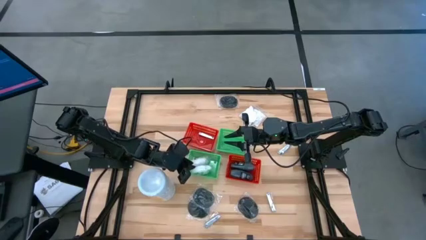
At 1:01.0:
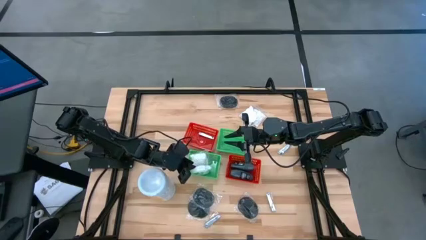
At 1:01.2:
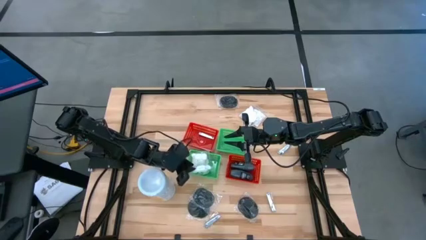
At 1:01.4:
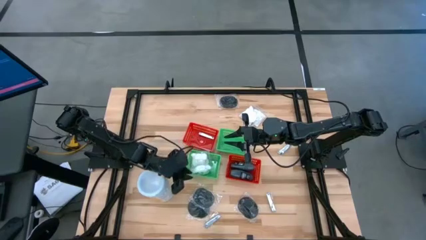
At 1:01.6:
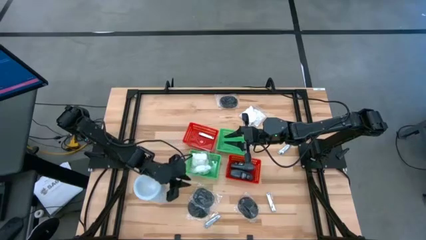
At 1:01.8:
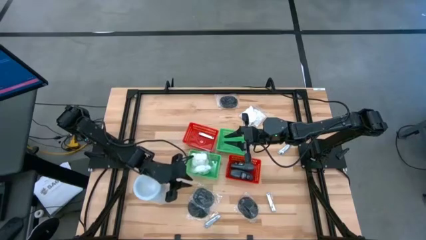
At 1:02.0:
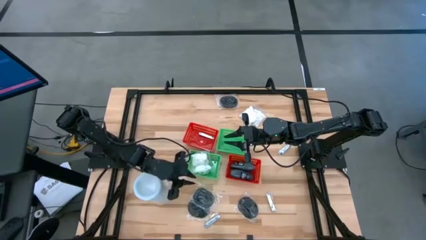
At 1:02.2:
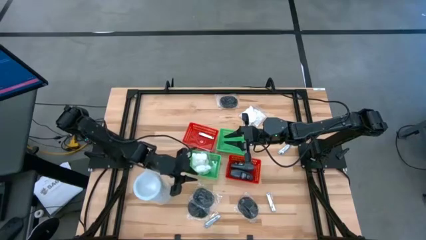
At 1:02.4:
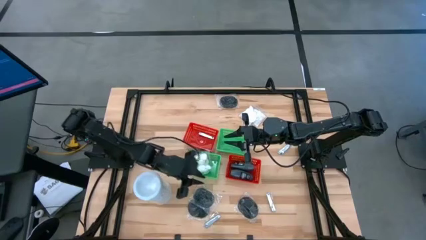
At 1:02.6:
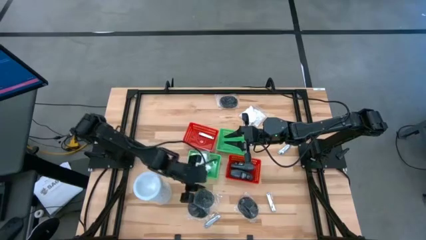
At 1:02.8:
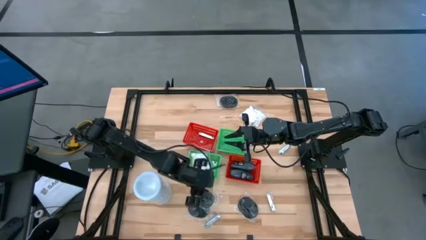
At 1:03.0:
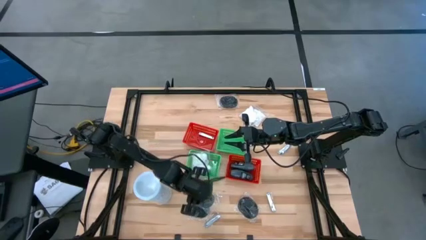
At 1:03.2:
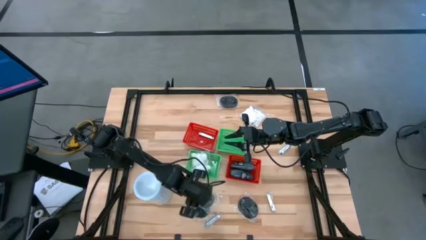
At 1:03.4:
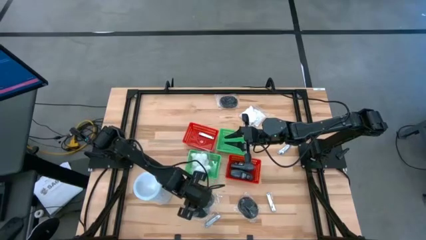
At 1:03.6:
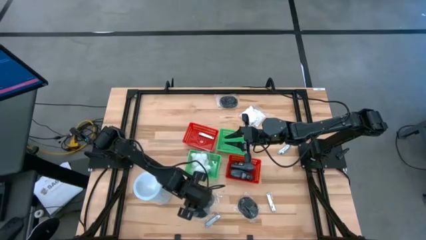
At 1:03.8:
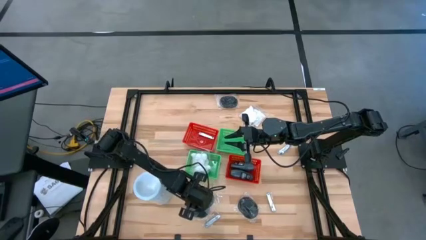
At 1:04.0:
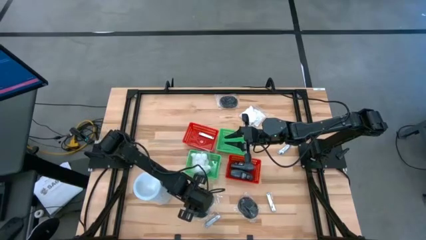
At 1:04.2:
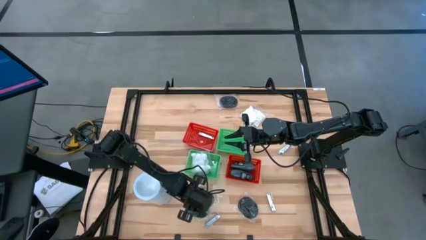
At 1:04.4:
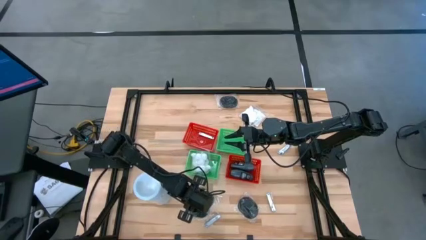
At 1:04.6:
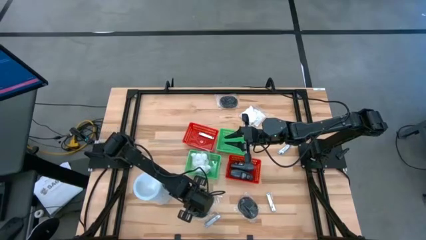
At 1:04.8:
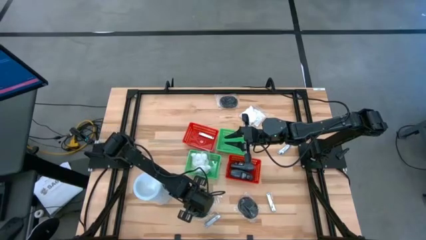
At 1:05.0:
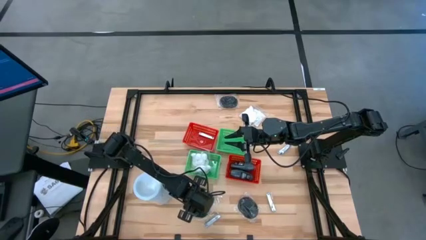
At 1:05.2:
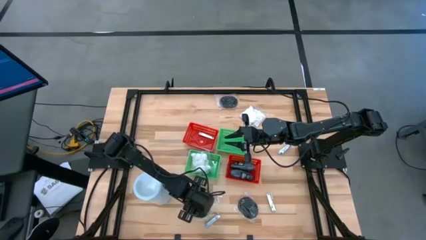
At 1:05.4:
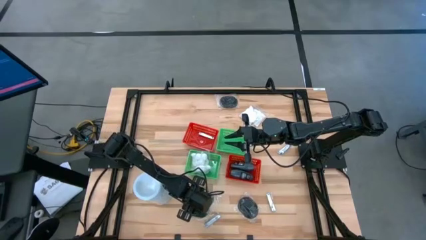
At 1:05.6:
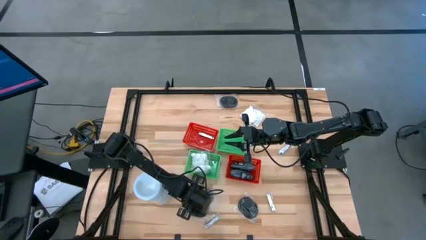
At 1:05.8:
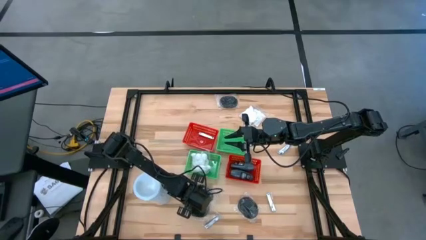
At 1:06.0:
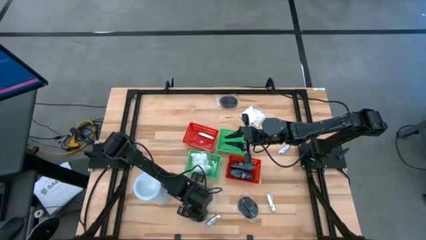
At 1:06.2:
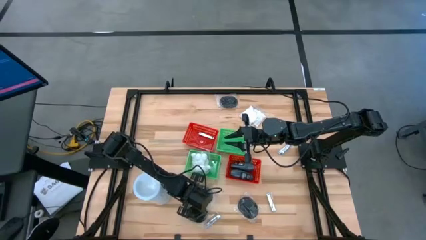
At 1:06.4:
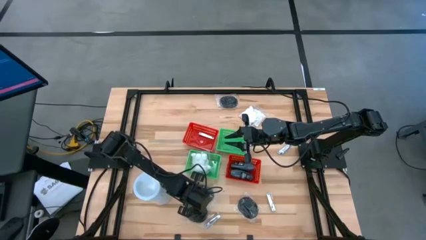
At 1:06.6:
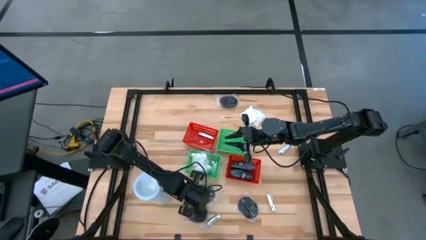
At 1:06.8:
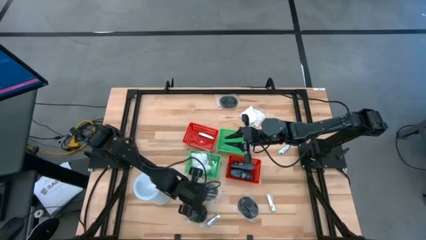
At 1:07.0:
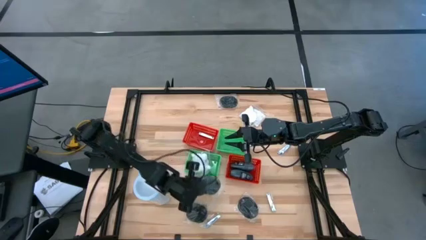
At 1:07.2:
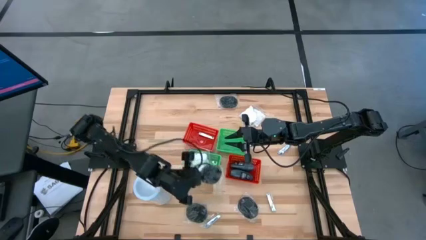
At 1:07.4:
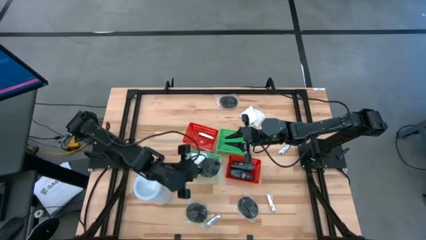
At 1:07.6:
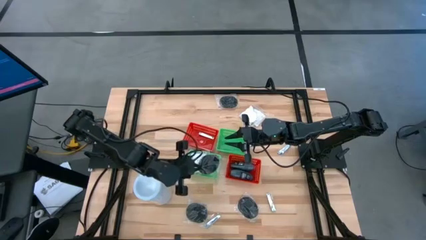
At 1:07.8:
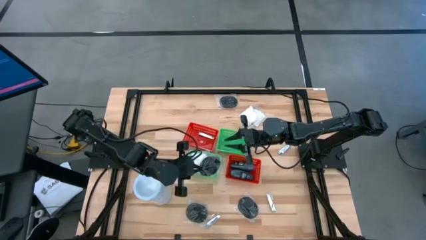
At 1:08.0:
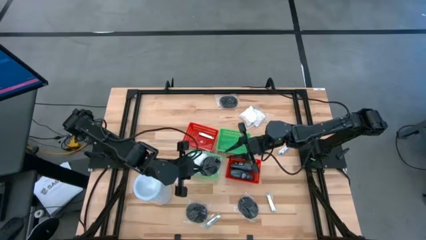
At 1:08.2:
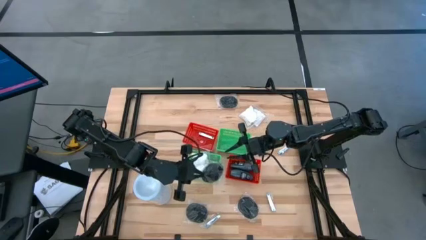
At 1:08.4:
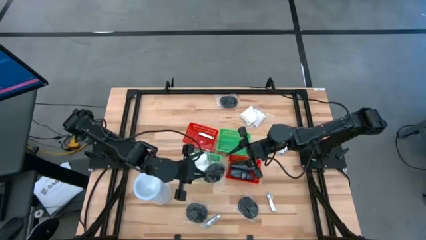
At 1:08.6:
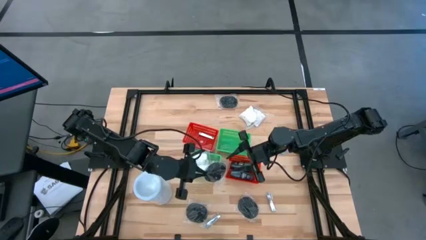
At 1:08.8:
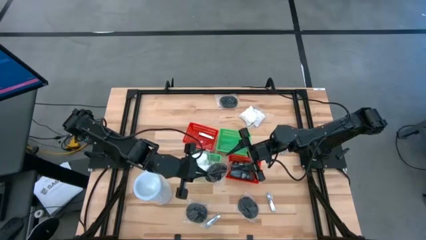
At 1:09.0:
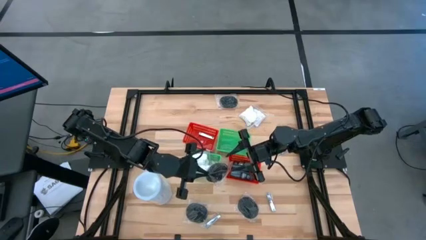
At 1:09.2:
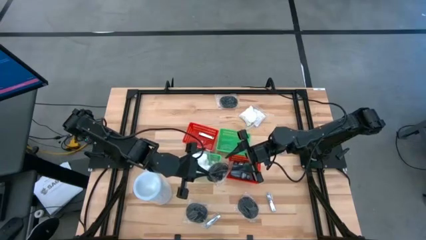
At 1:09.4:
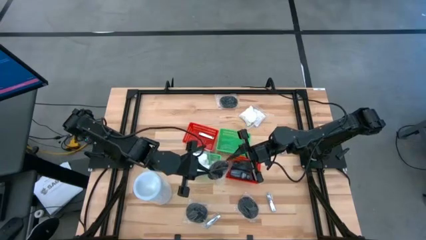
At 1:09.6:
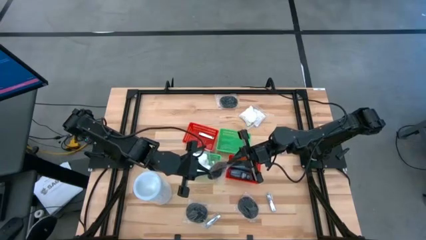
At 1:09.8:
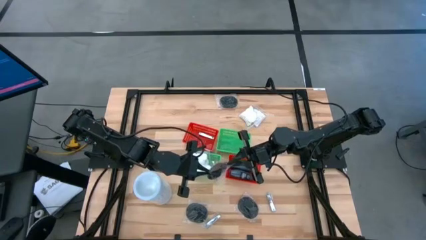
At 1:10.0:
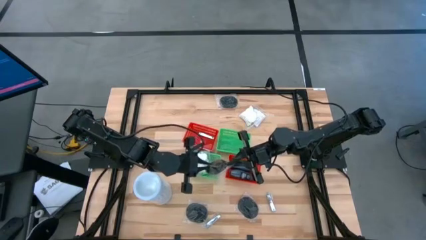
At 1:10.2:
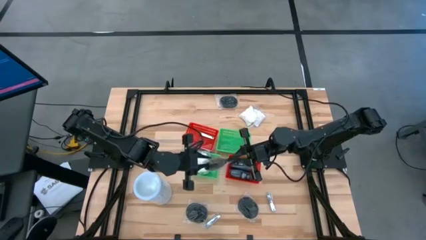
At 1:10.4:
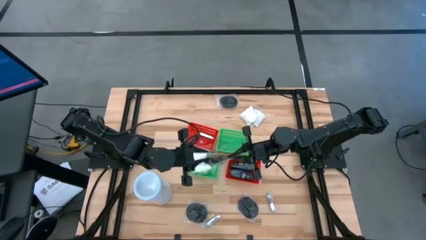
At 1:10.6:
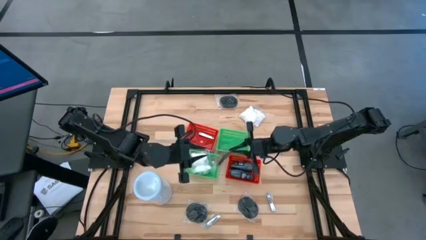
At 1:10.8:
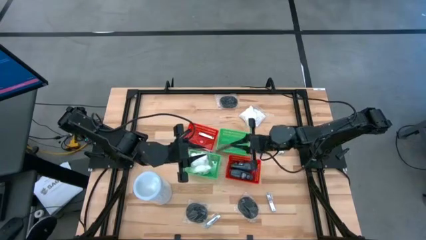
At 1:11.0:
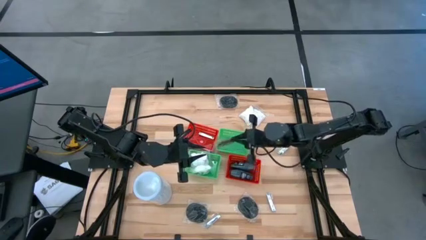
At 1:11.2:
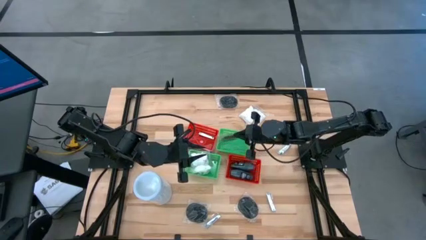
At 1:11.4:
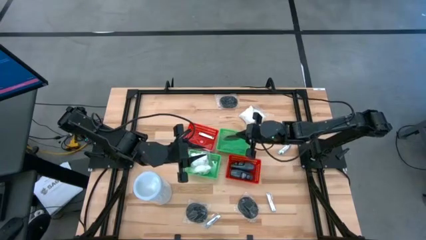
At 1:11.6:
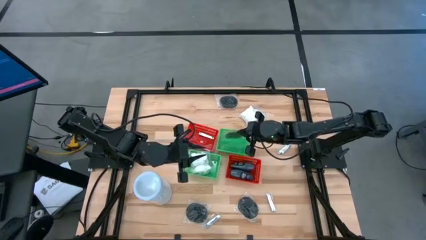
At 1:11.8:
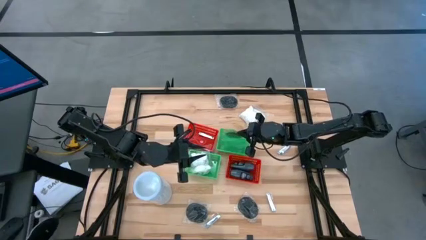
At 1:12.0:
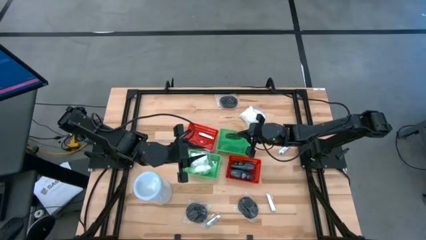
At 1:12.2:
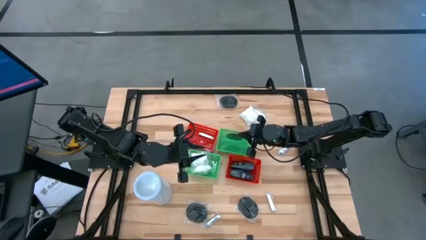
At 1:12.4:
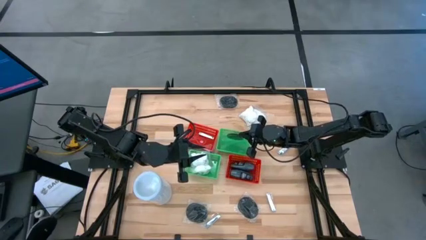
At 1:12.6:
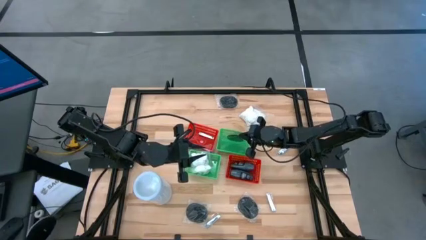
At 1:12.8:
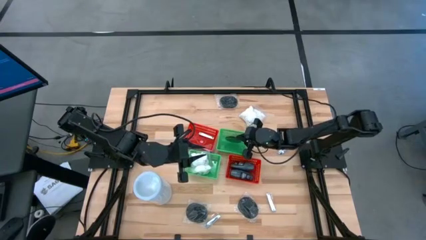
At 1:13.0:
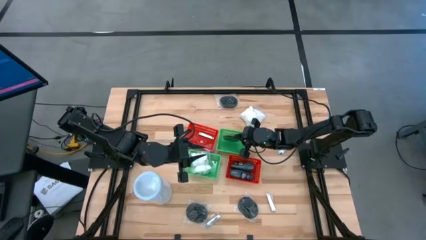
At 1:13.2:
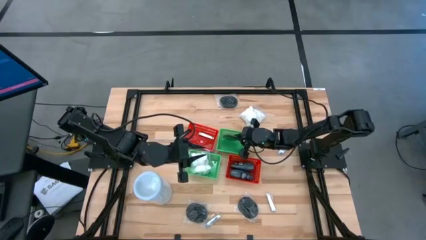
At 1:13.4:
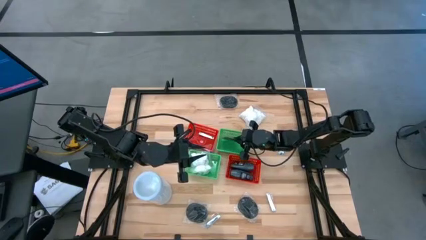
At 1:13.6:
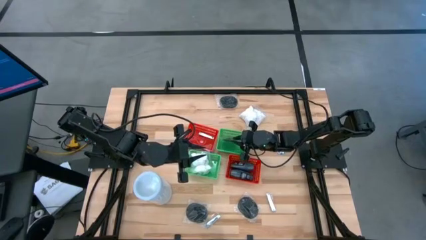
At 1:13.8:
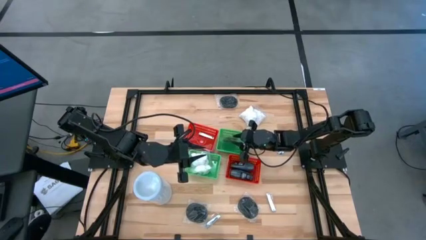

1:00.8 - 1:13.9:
Task: Pick & Place Travel size toiletries
Put the black hairbrush into the top right green bin

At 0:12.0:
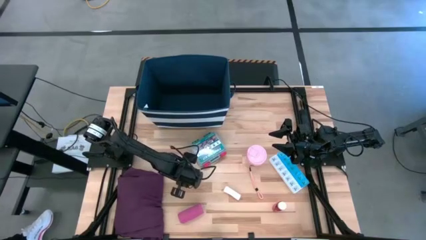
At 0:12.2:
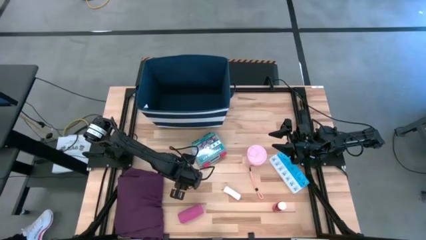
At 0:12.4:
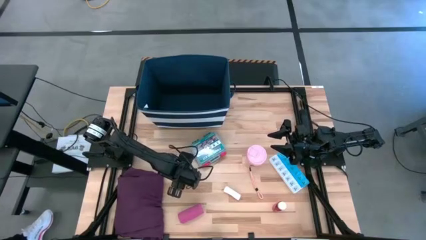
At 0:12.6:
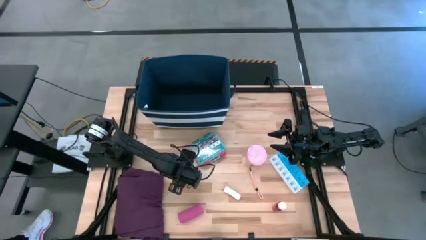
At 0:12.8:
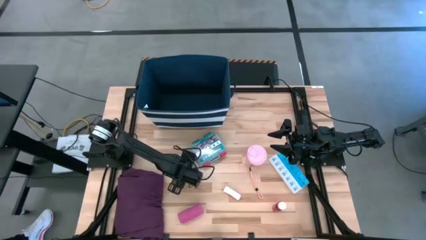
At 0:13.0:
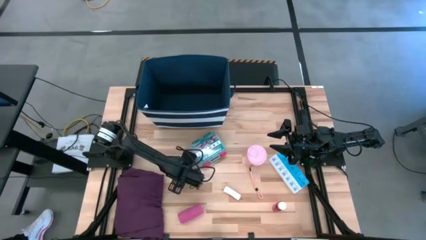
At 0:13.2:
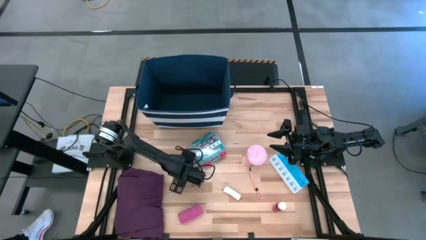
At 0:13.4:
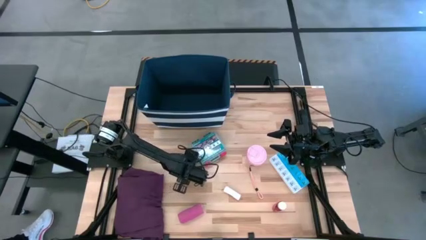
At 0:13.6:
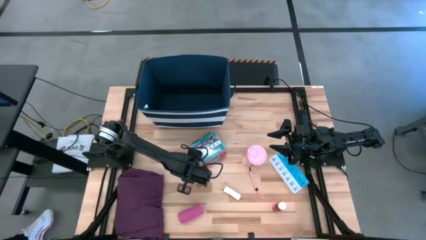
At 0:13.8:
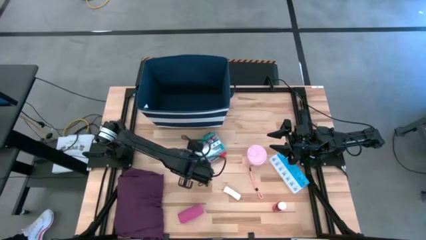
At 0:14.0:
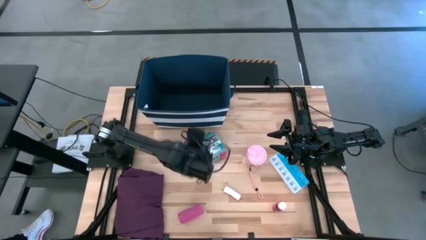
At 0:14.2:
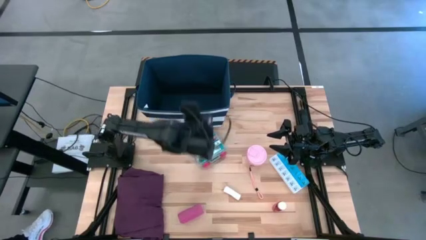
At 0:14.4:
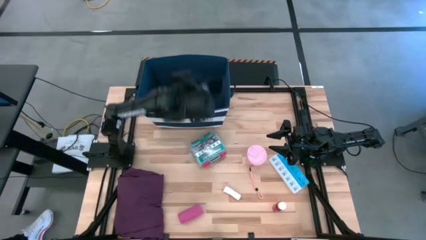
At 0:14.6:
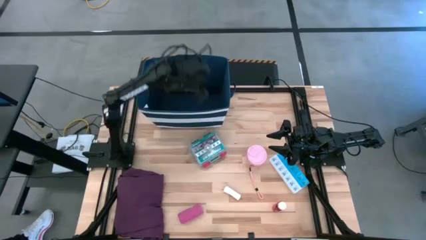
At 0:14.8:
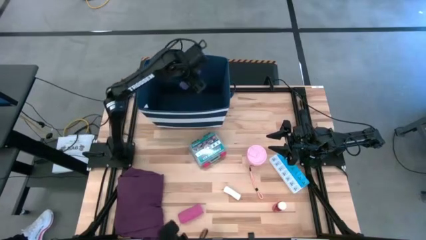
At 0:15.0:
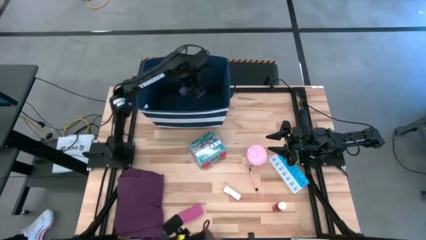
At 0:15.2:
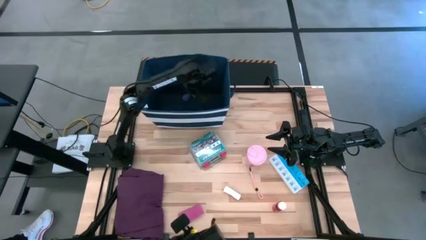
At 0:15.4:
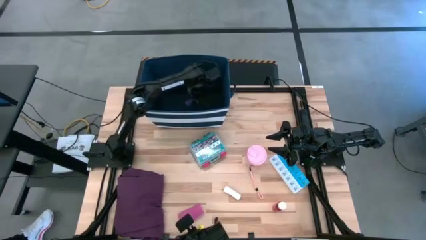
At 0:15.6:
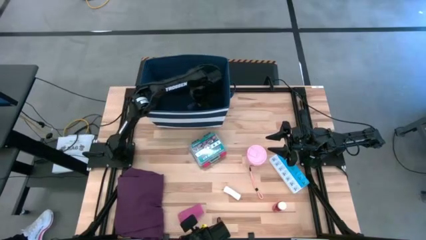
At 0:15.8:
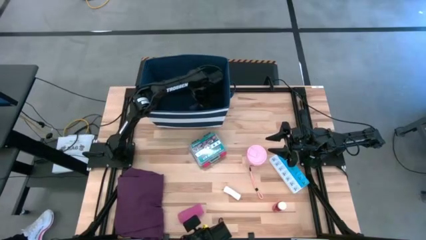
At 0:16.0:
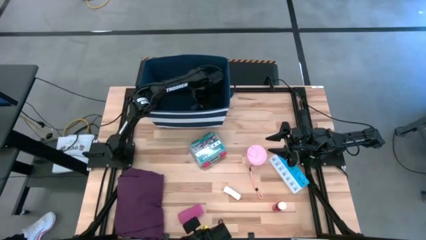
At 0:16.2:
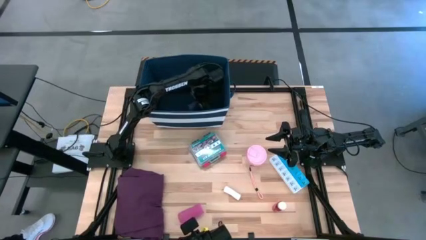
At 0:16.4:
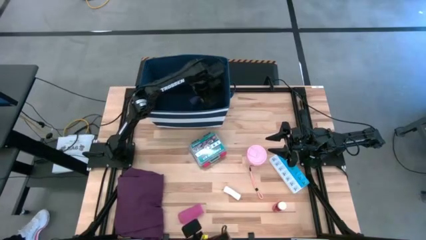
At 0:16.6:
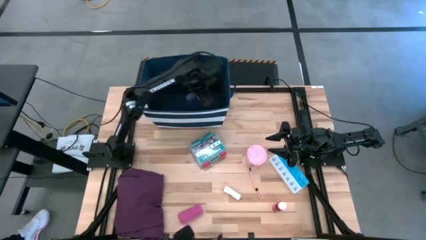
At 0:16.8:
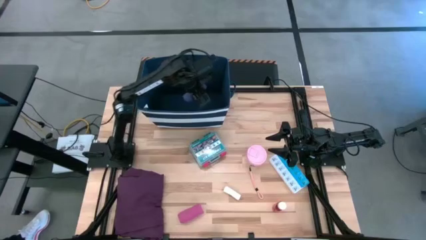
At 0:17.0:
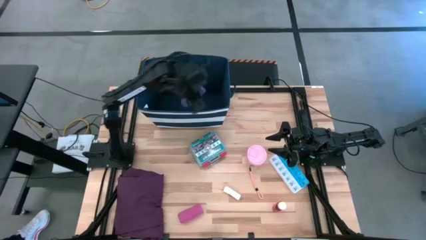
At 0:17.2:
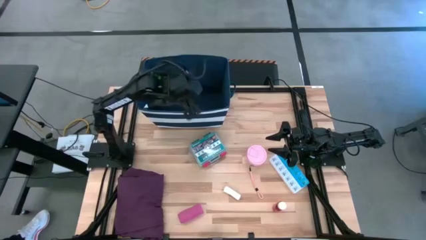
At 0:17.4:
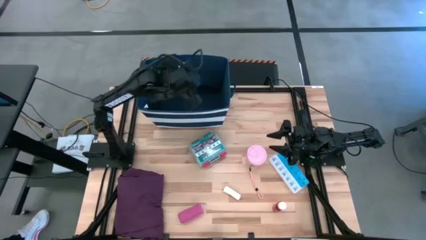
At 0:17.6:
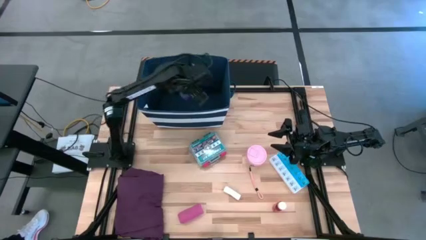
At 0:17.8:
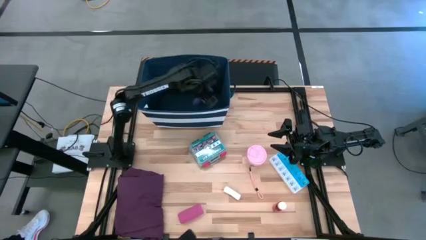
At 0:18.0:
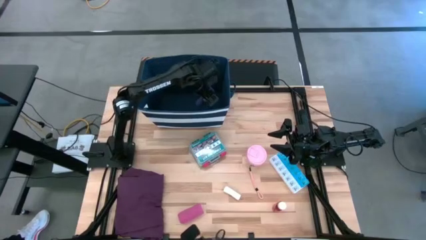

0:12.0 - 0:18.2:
Task: Pick & place medical supplies in basket/bin
Put the violet bandage into the blue bin
